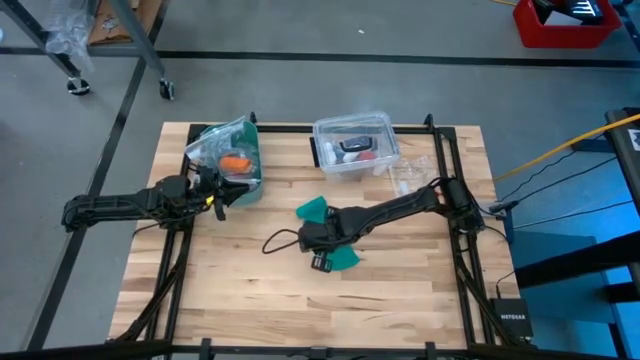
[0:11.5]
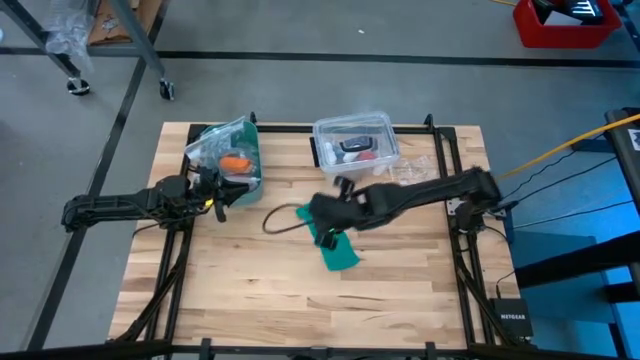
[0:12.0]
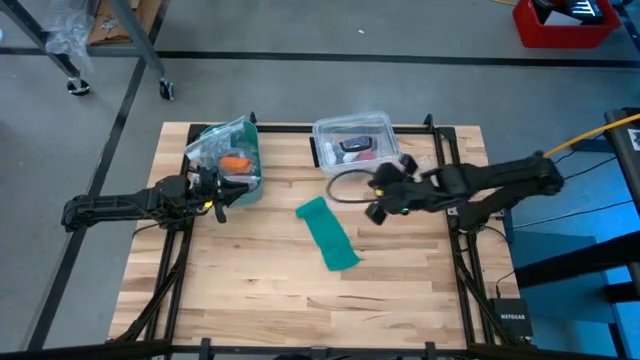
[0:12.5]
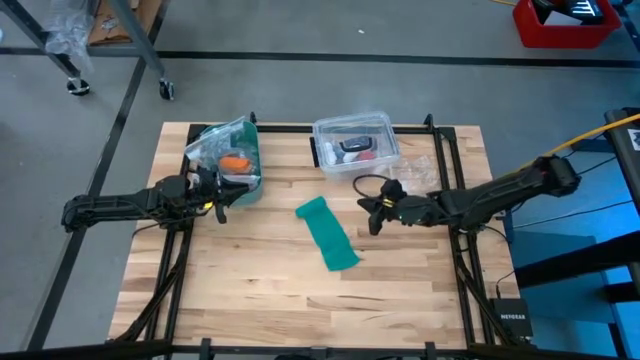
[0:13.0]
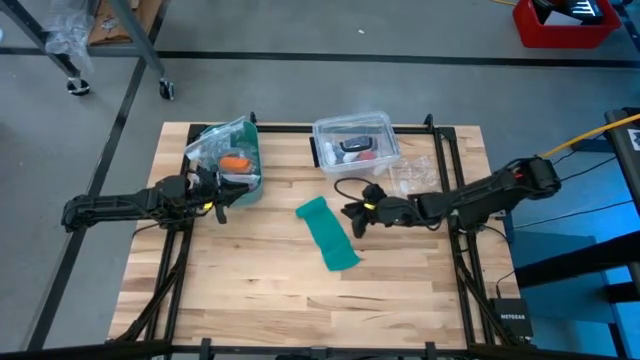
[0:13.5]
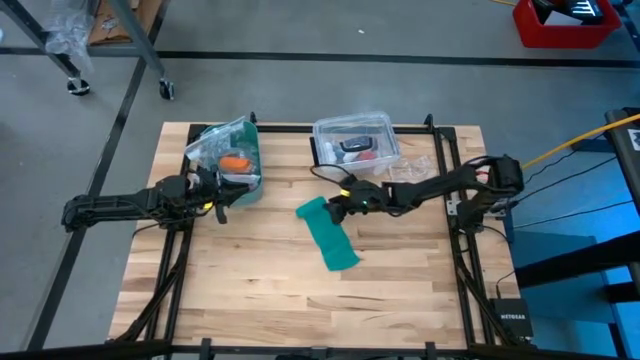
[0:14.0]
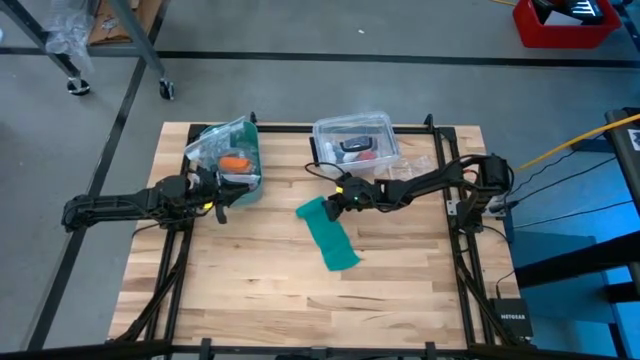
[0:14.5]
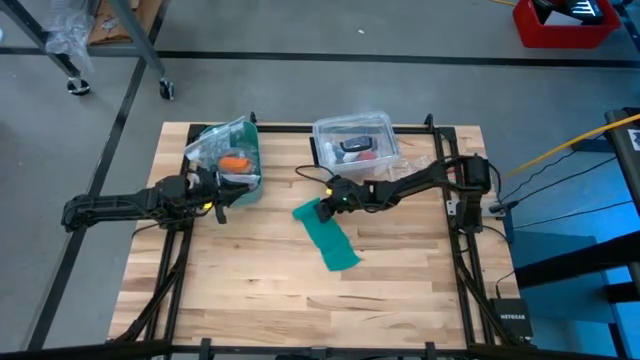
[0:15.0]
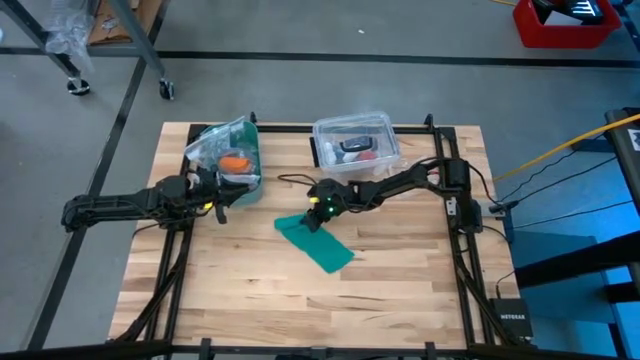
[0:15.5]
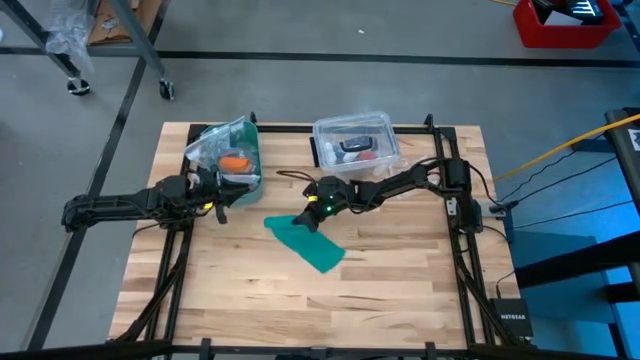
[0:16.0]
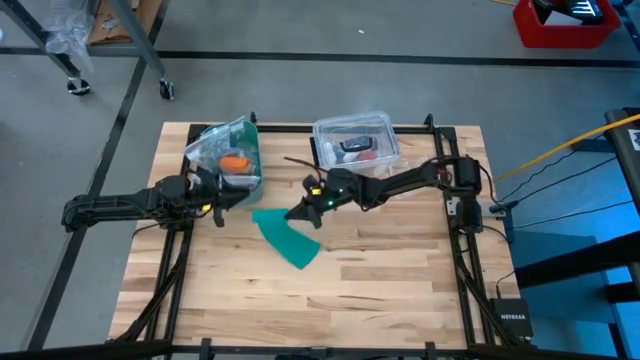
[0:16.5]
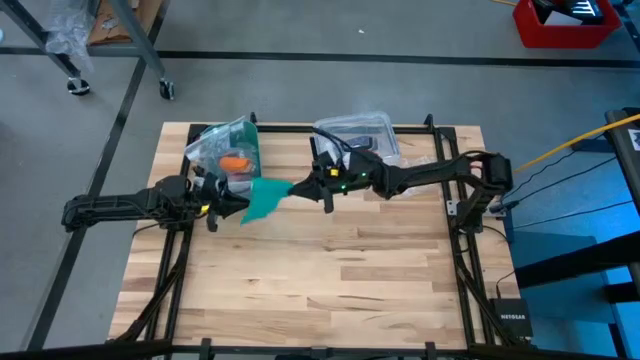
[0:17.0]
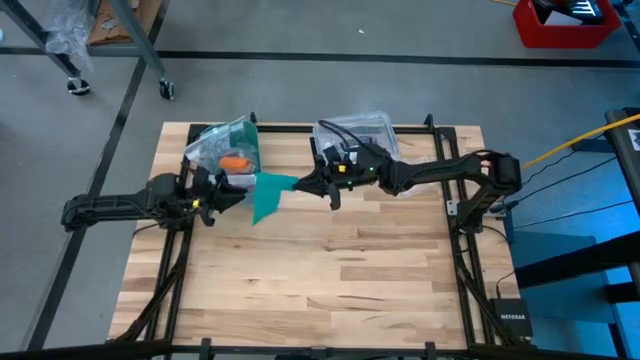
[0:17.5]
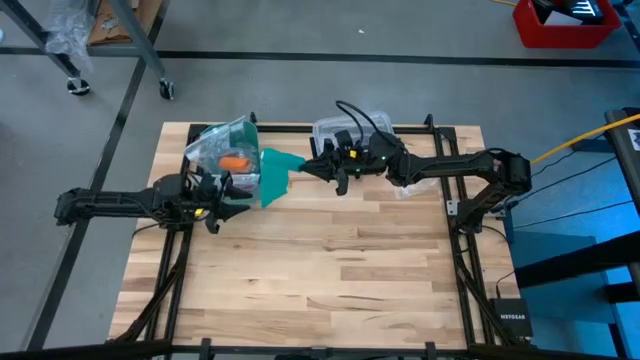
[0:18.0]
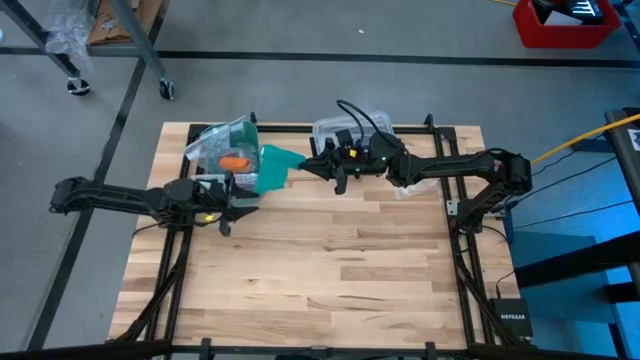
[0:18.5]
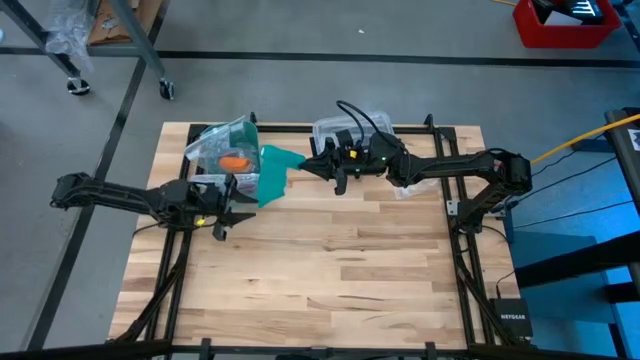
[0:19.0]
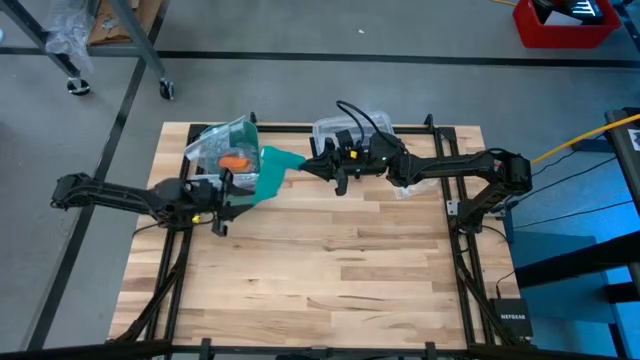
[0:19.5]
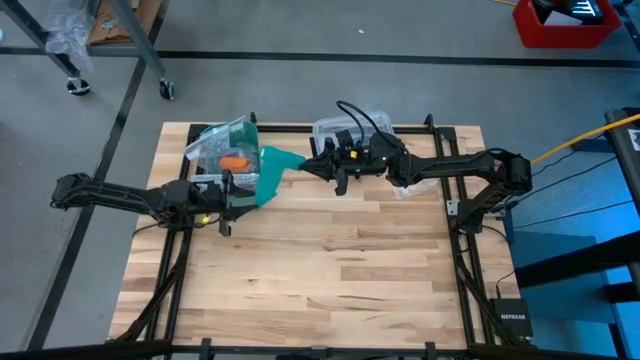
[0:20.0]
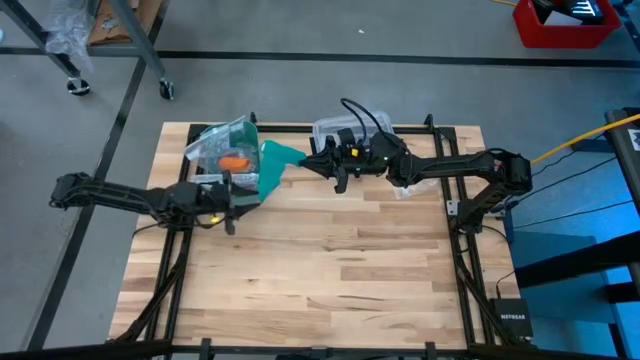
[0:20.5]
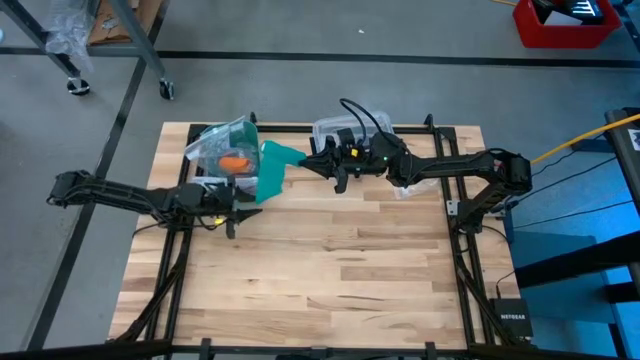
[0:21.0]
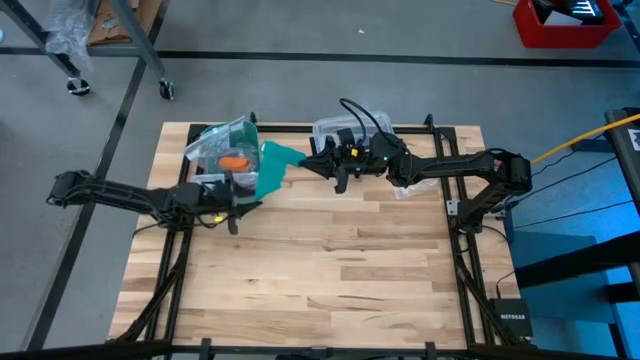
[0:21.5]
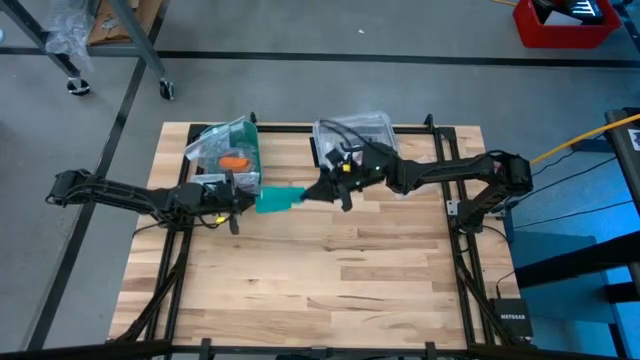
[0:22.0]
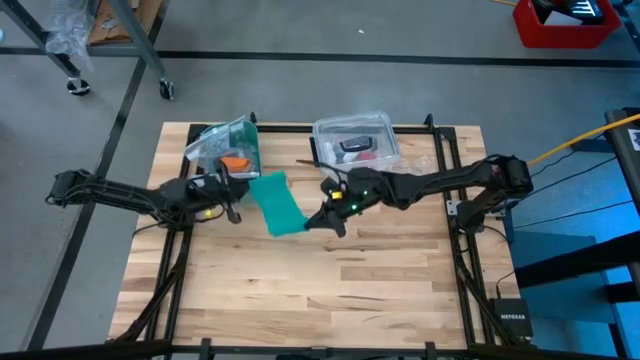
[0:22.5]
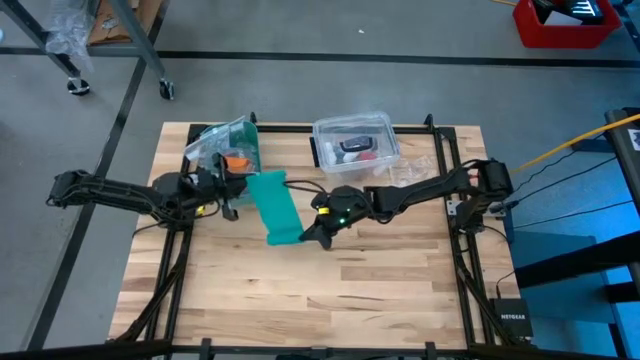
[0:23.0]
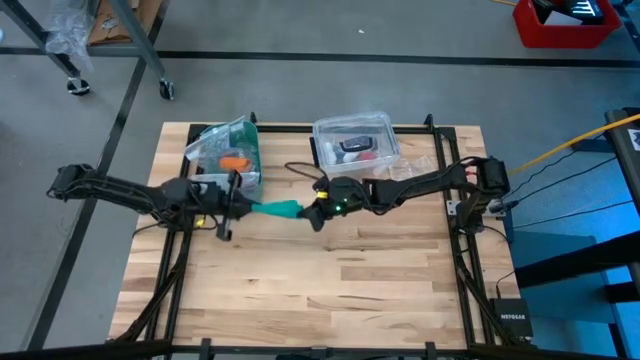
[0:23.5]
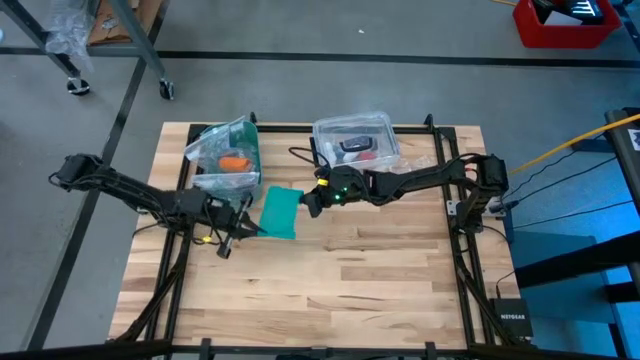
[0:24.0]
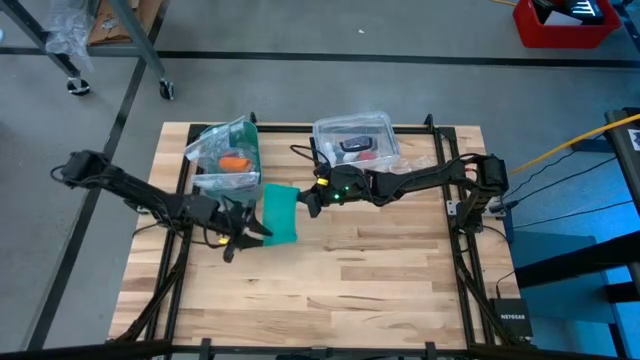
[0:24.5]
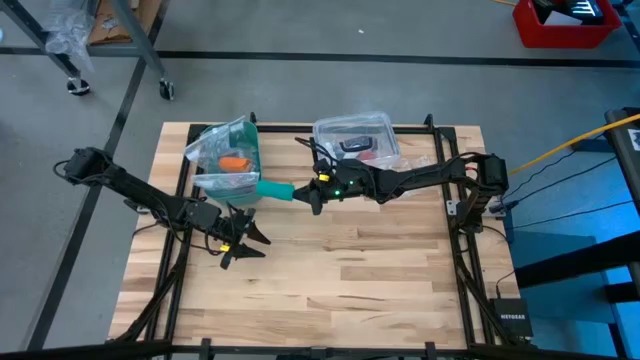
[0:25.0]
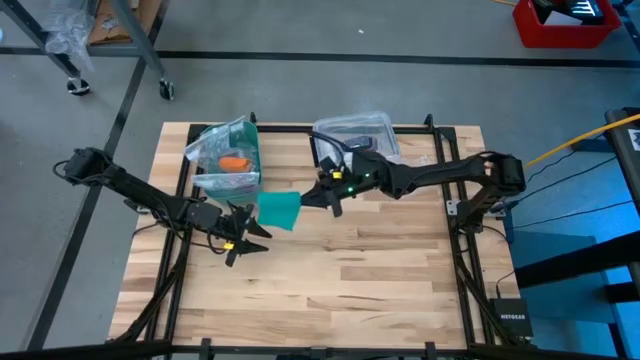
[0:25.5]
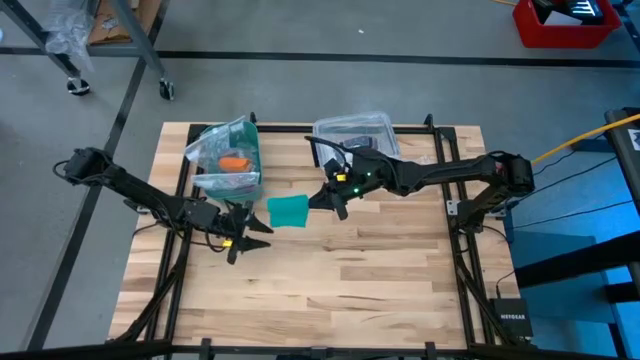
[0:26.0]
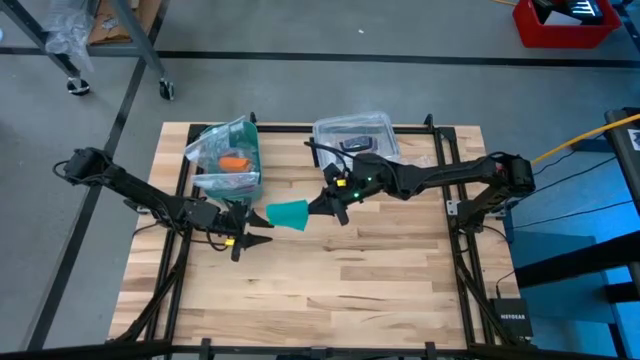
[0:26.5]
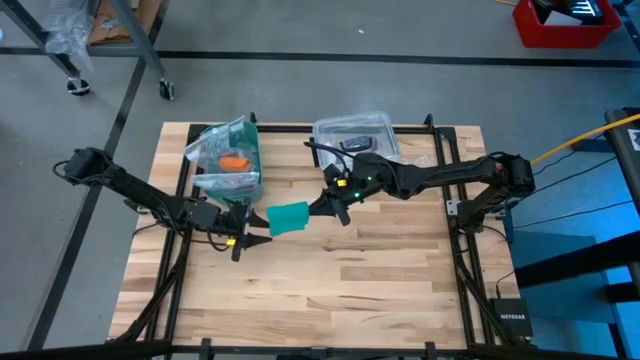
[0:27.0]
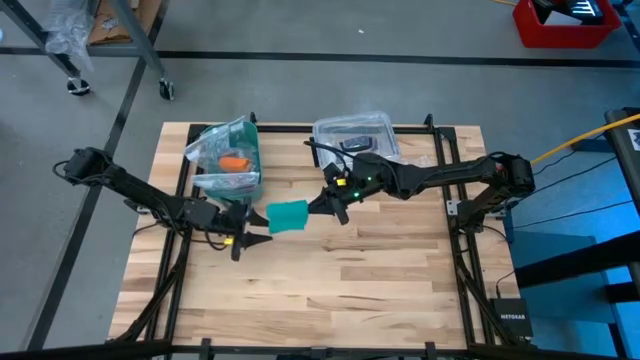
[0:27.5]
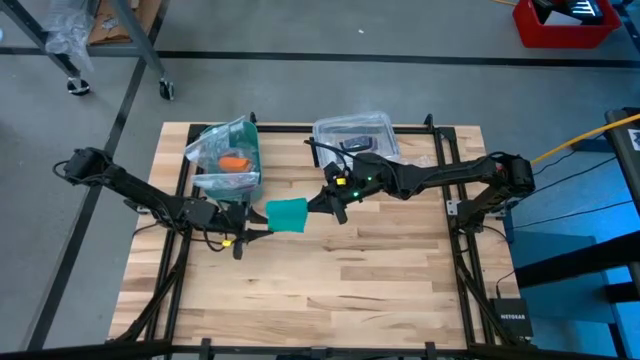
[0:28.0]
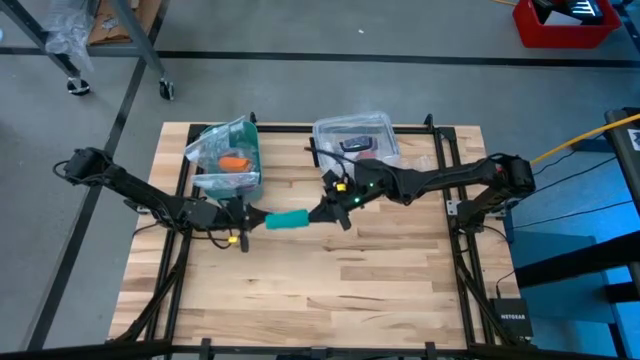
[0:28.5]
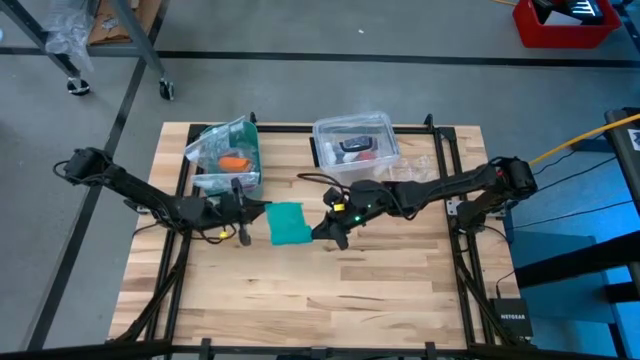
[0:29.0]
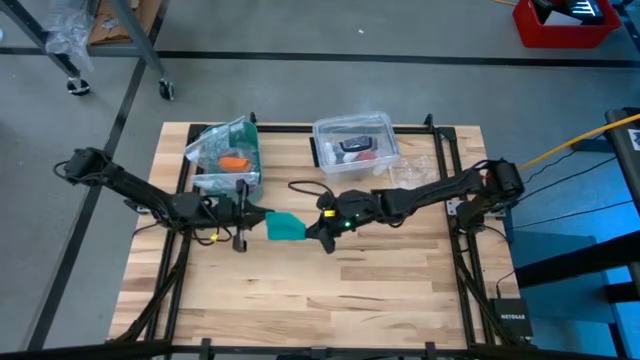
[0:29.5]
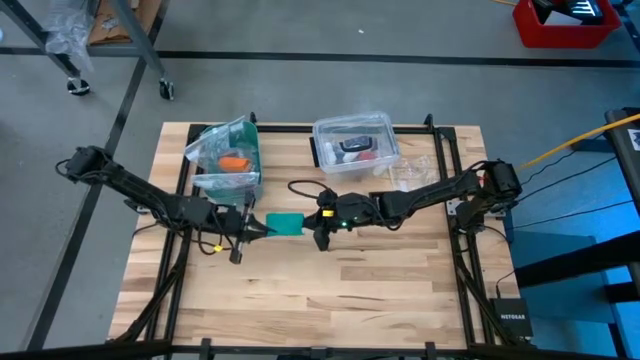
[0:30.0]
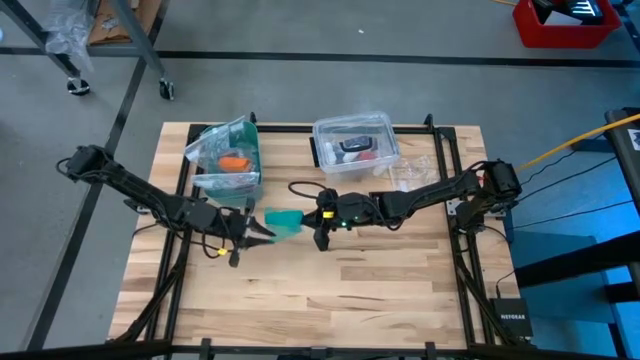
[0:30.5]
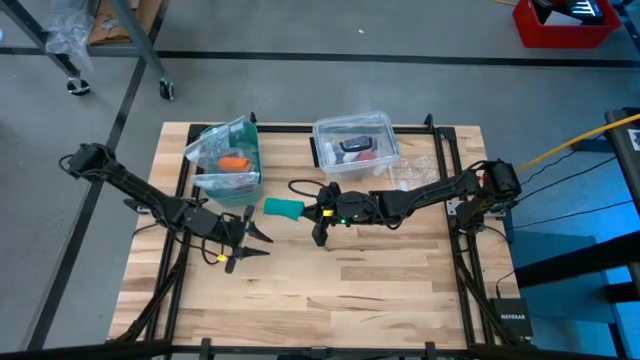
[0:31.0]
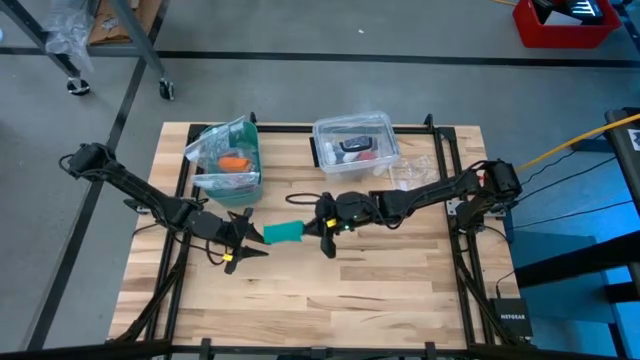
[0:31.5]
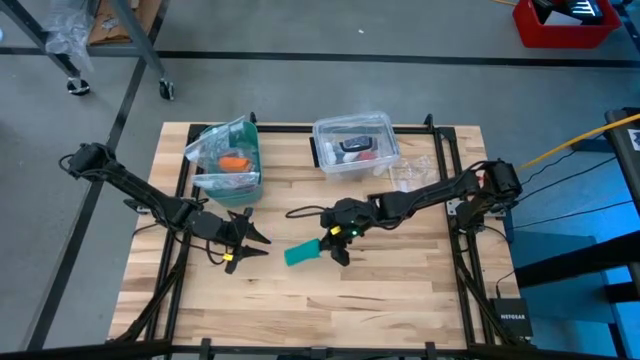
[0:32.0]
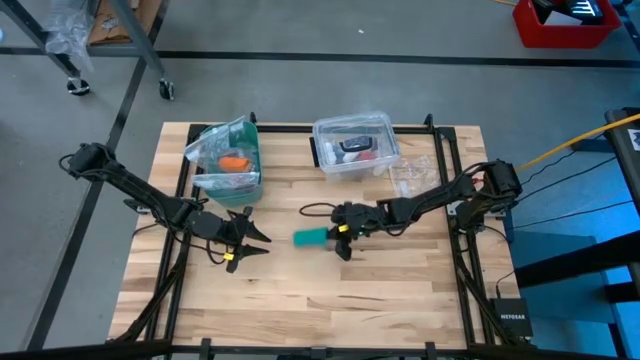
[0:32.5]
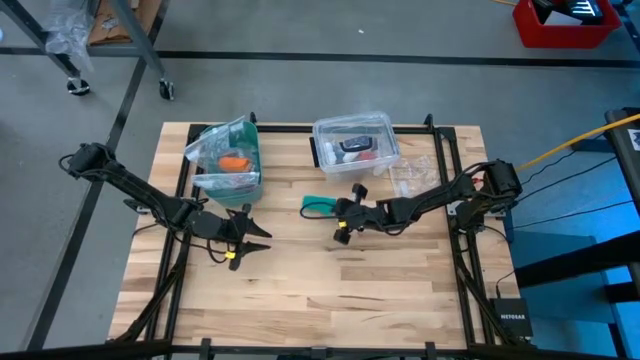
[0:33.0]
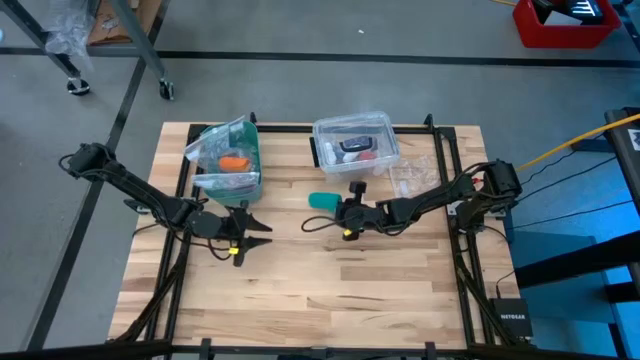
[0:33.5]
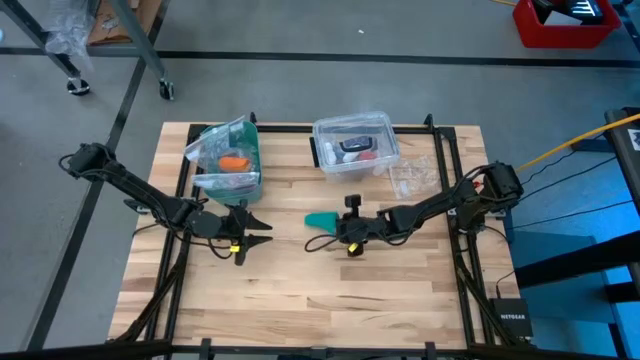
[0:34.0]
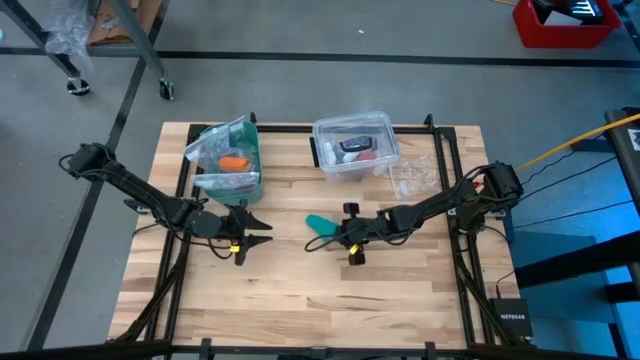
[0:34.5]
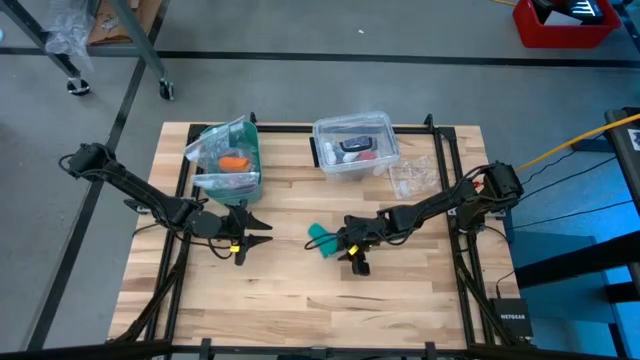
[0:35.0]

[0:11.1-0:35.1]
Task: Roll bandage
Roll the green bandage
